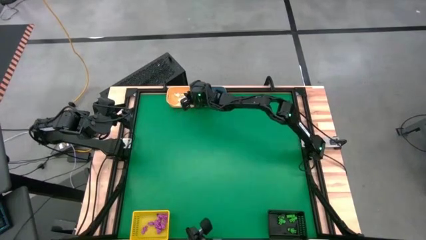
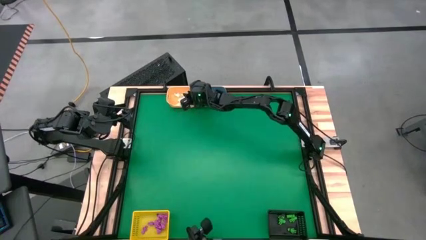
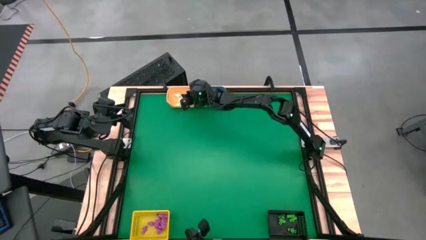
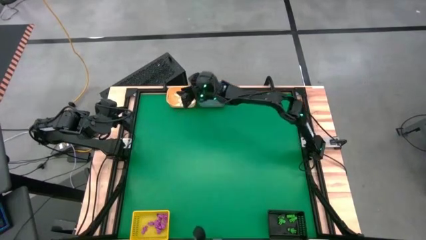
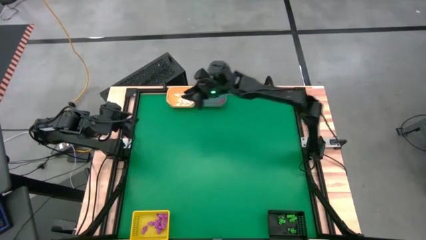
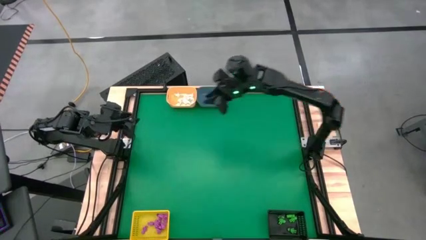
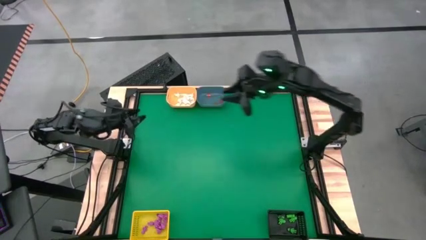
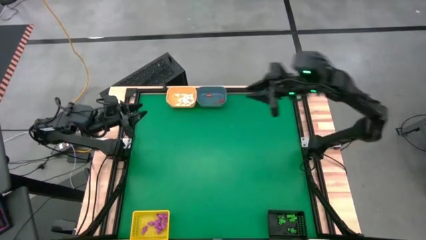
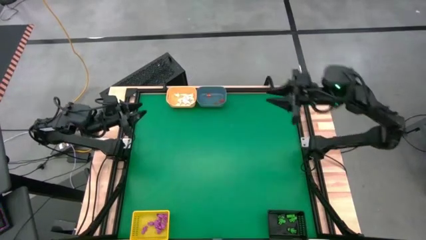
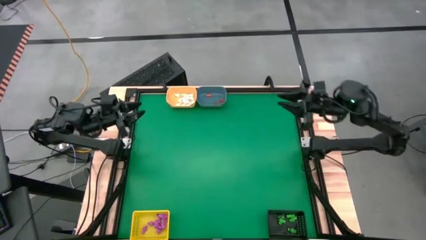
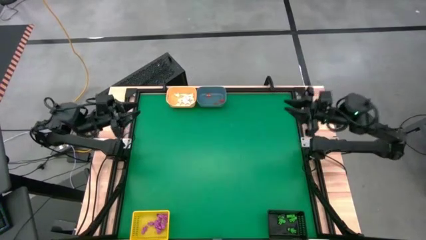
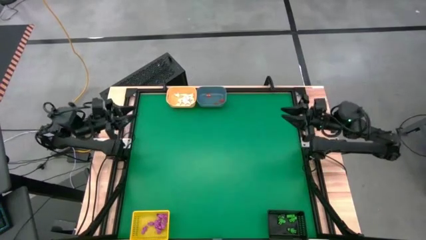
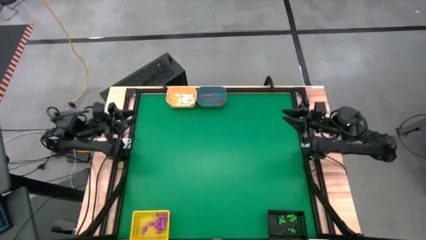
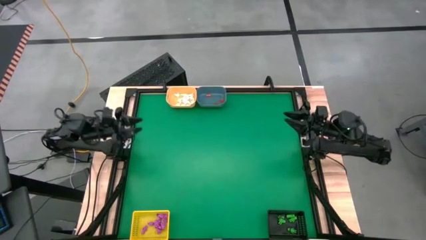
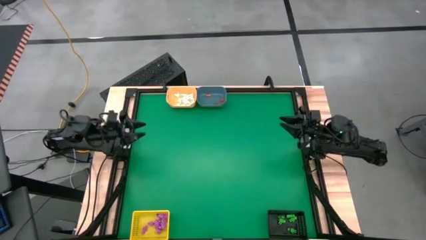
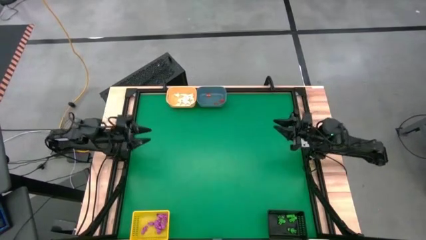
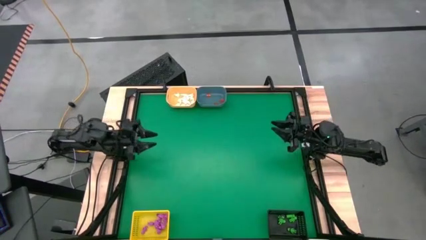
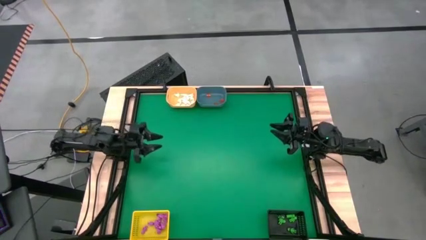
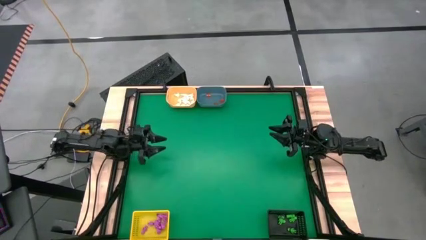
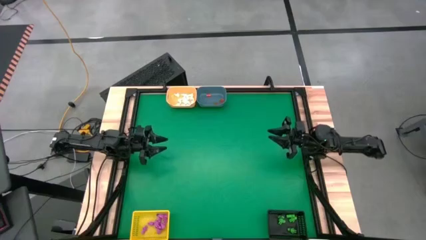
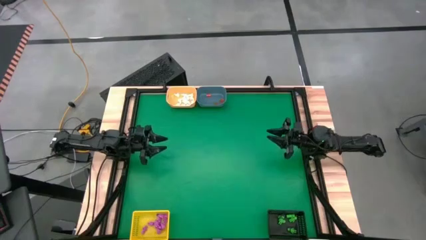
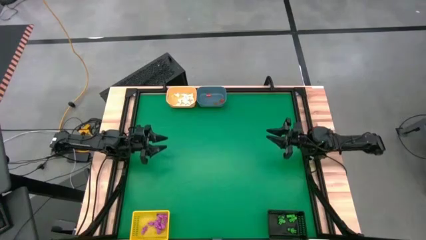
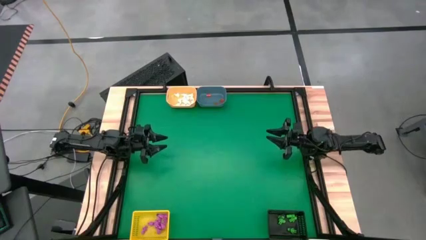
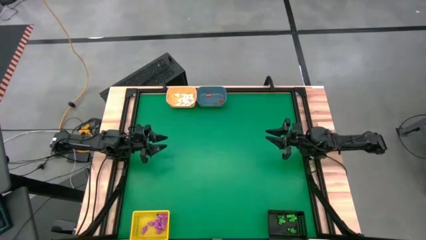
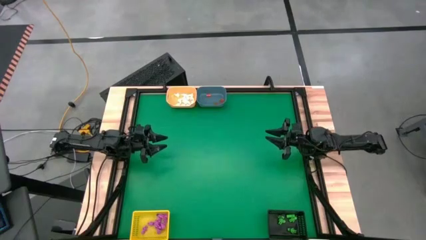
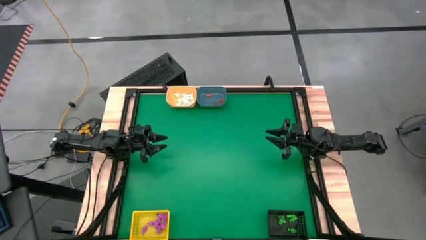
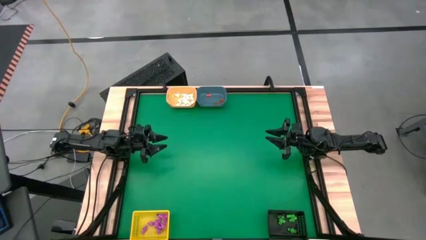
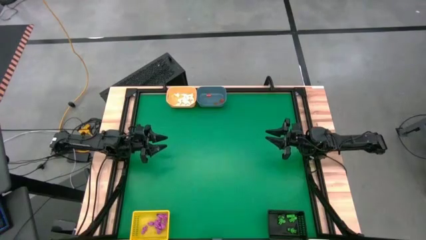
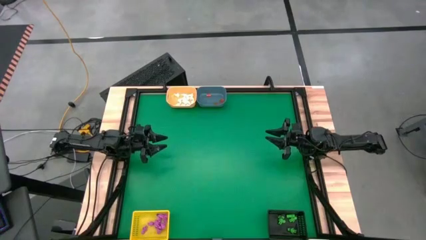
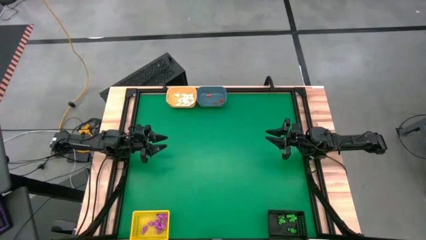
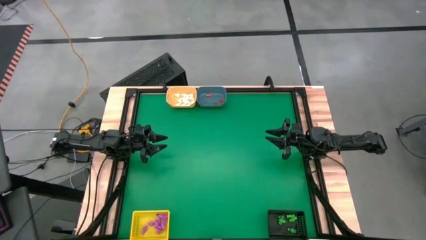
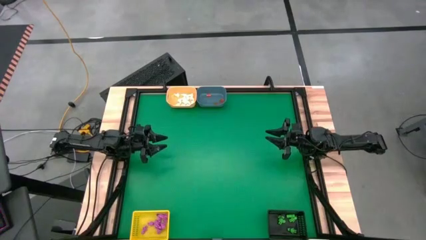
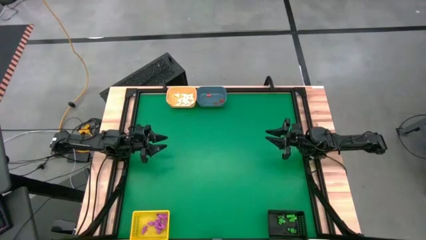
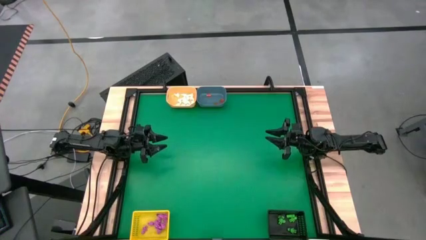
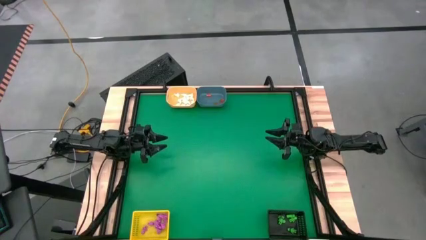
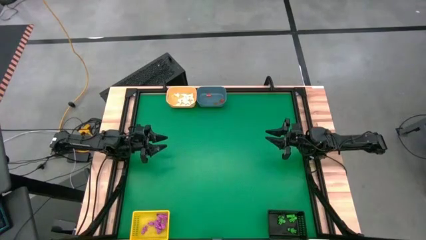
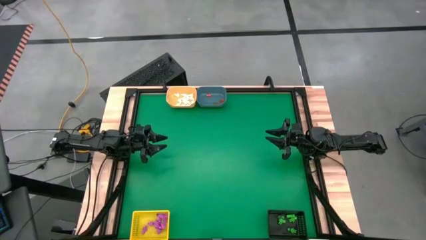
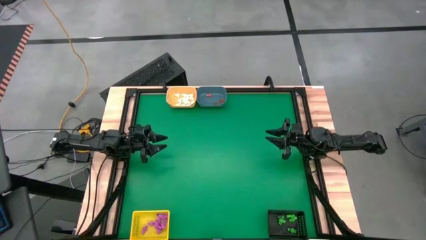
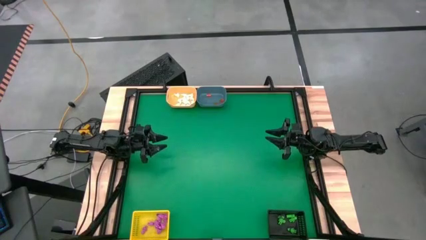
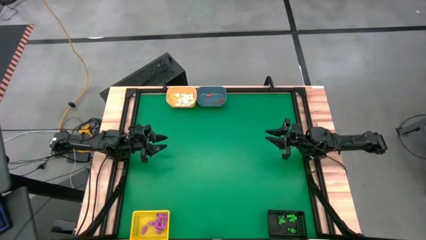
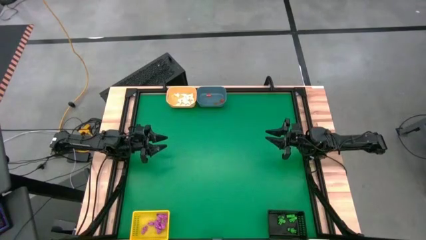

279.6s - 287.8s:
Task: Sort Halloween decoration
Return to Home Position

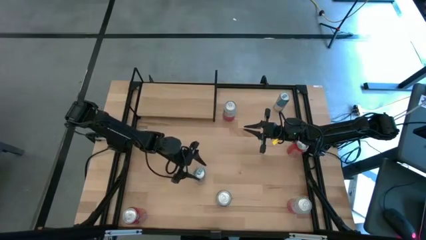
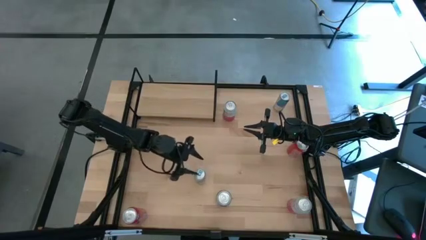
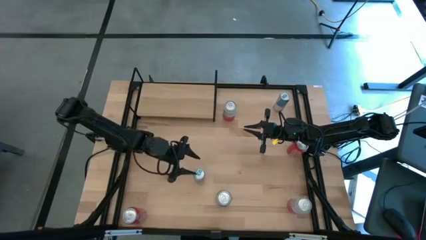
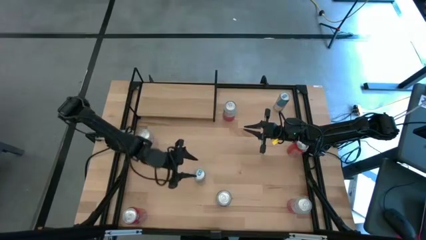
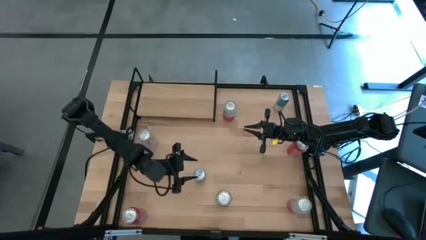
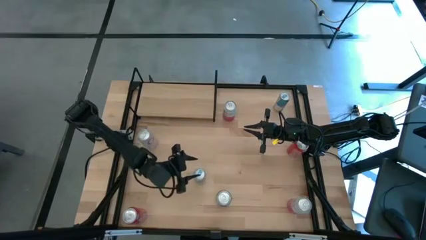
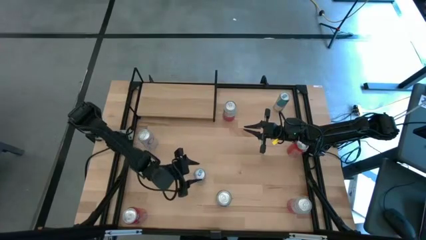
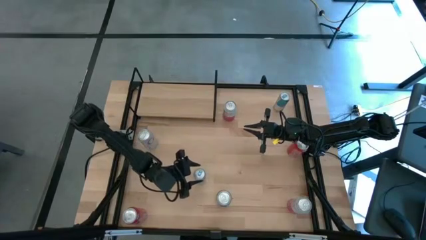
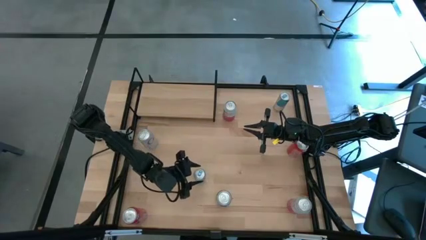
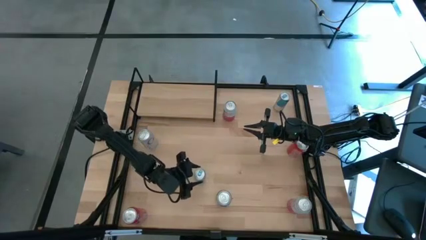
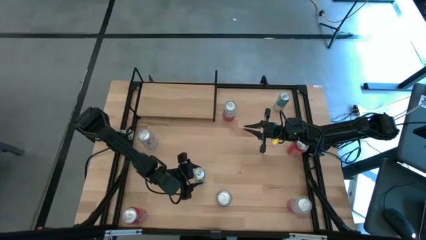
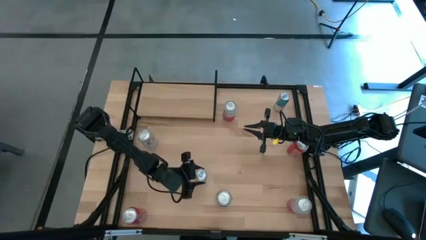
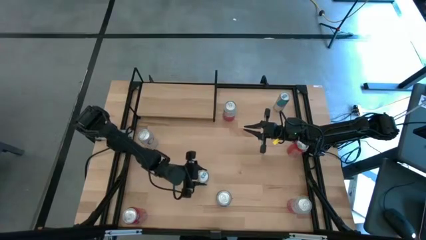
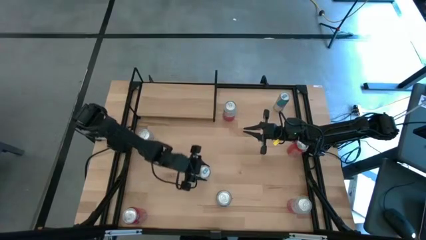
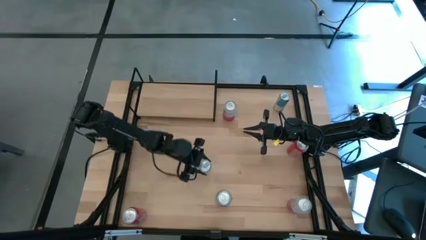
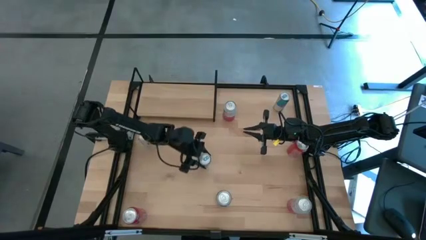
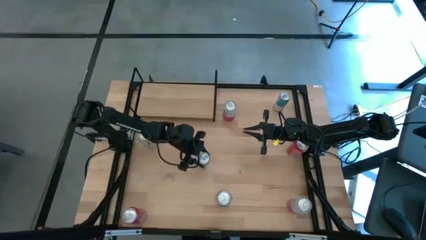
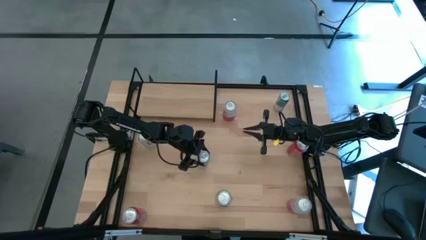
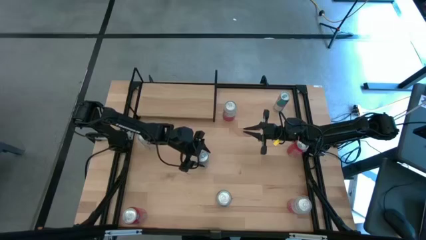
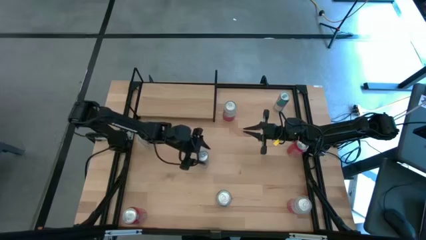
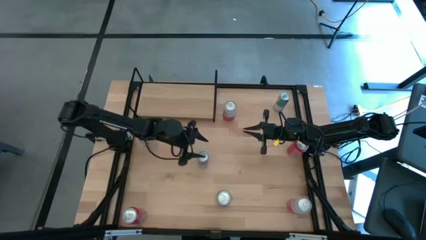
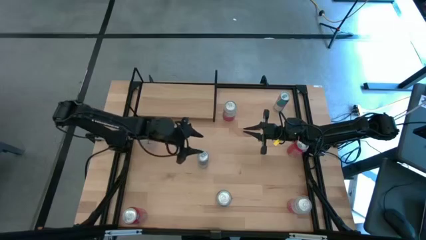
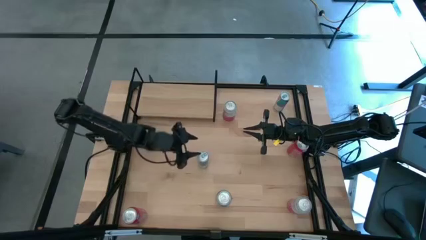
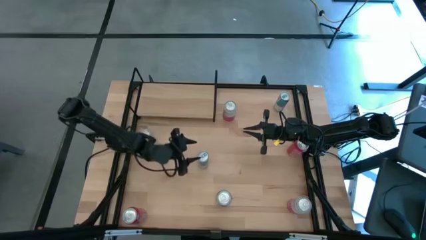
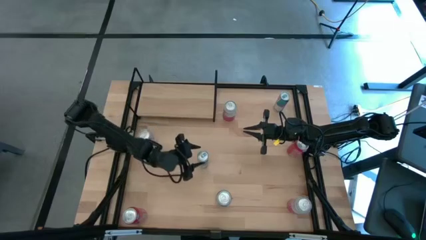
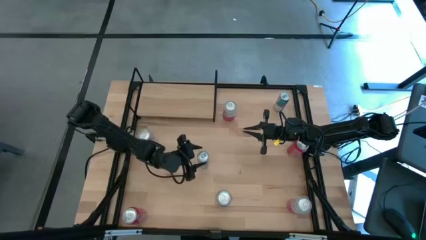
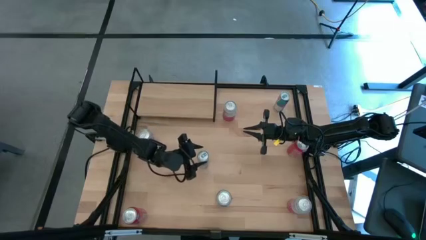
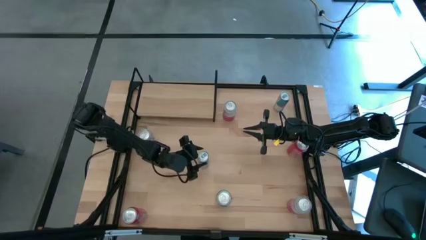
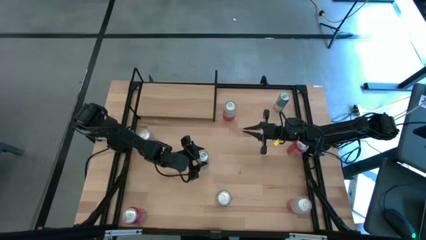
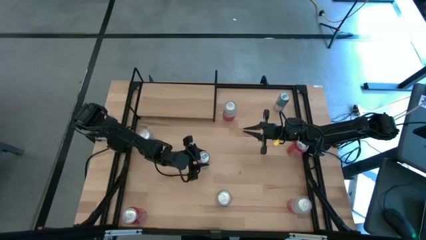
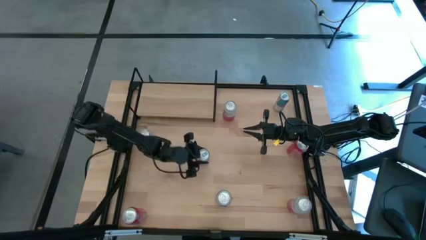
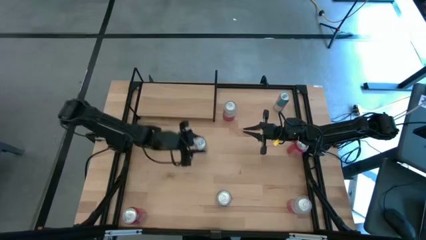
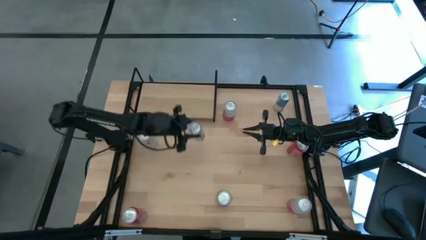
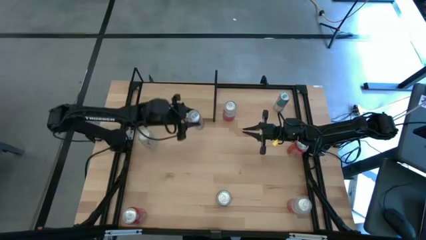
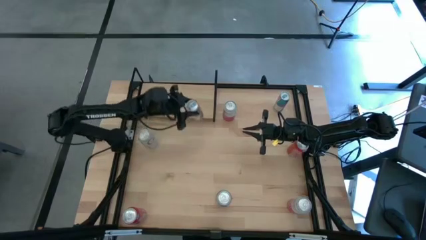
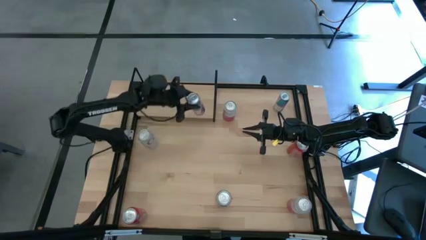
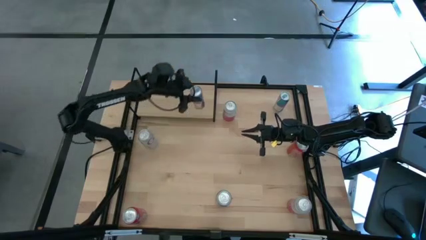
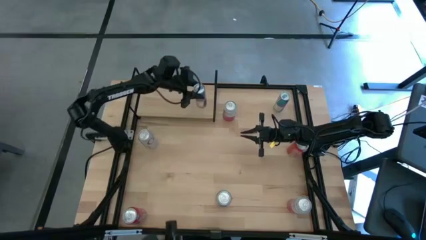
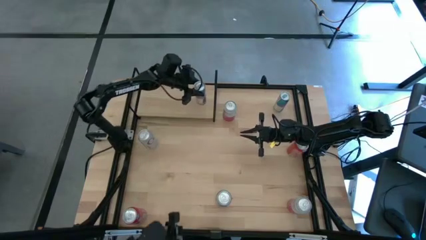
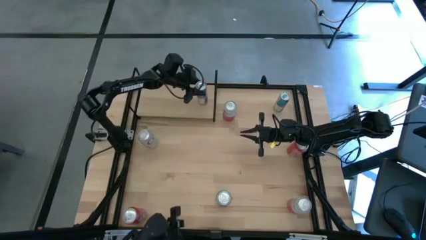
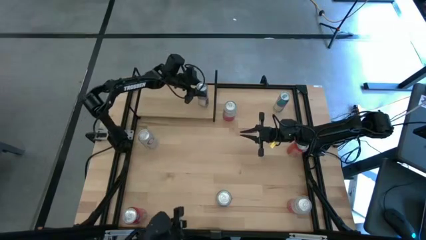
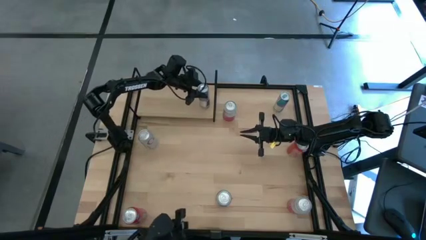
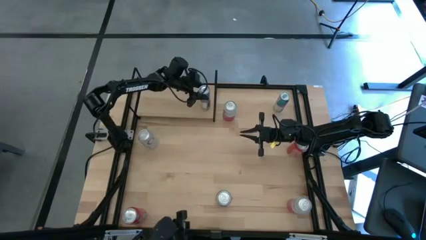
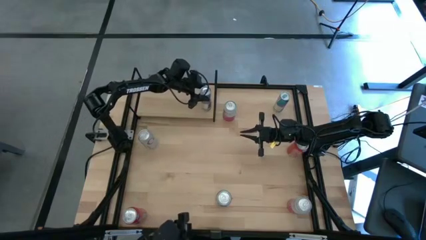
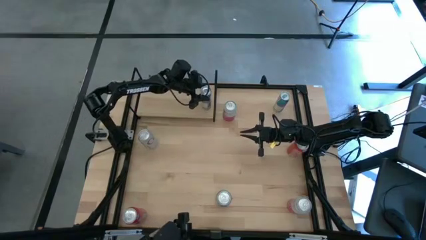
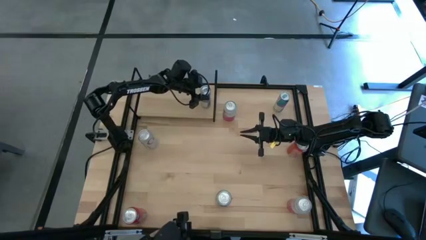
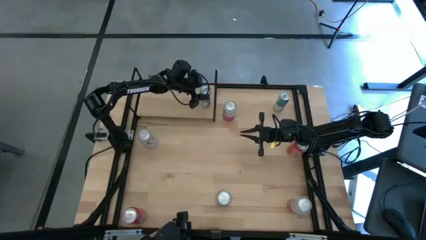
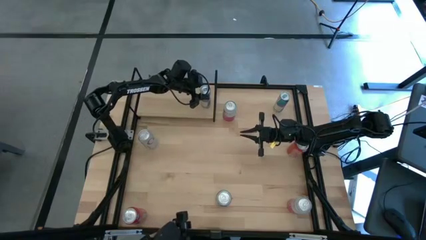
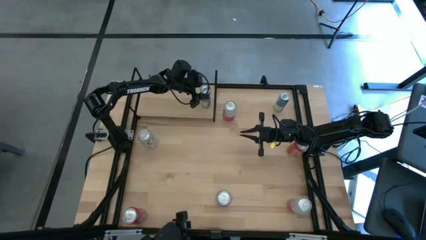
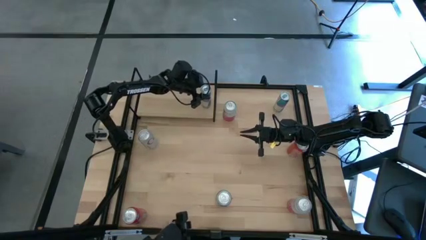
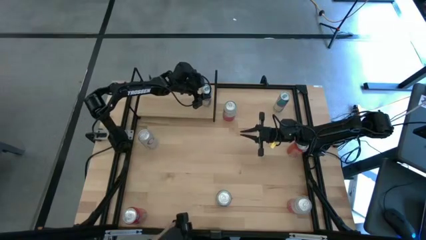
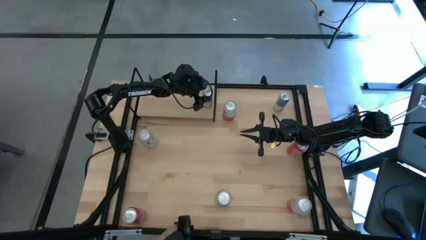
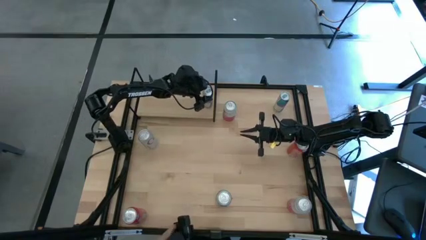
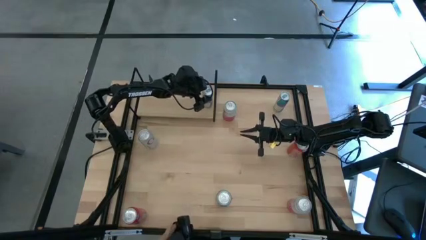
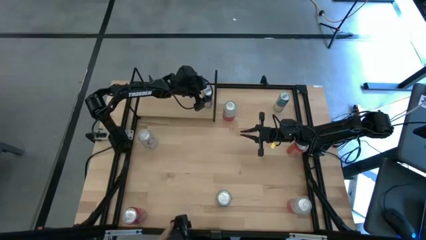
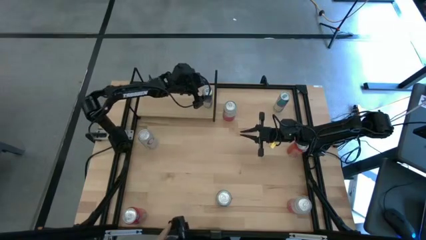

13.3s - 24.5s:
Task: Place canned beverage on shelf
Put the bottom blue soda can on the shelf
